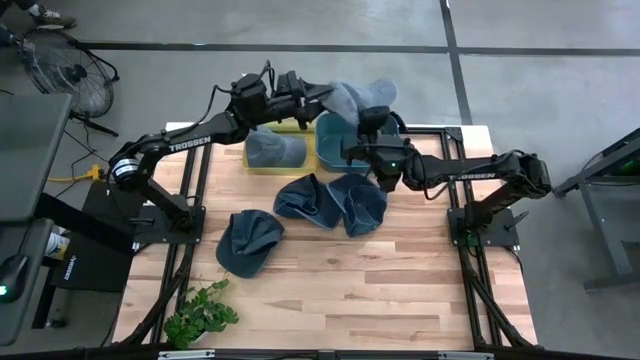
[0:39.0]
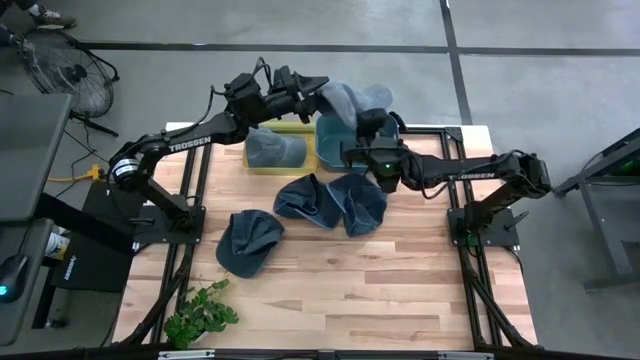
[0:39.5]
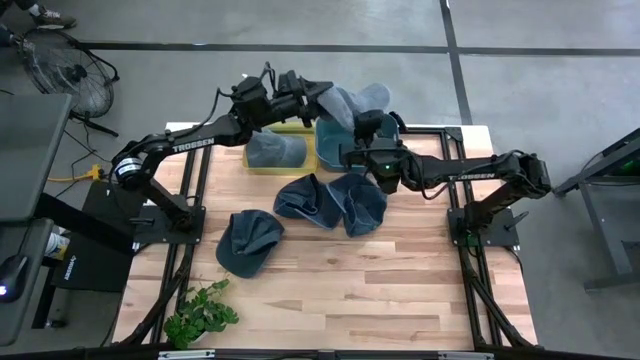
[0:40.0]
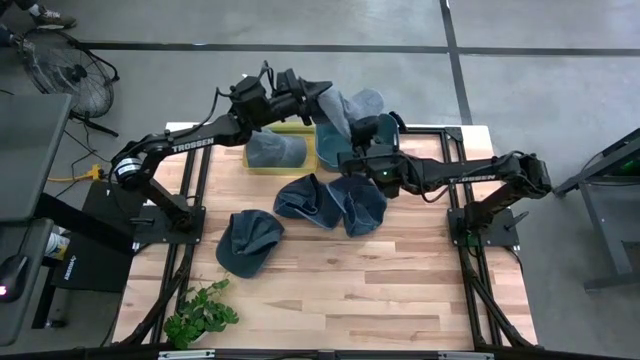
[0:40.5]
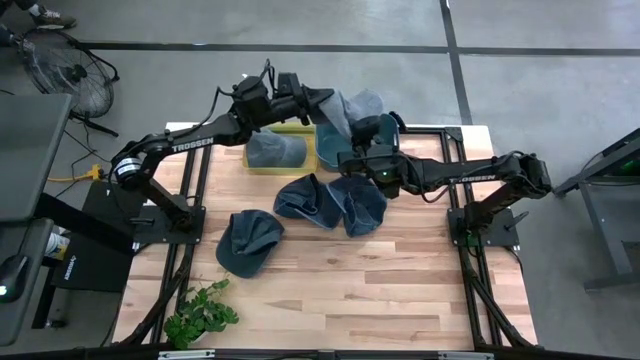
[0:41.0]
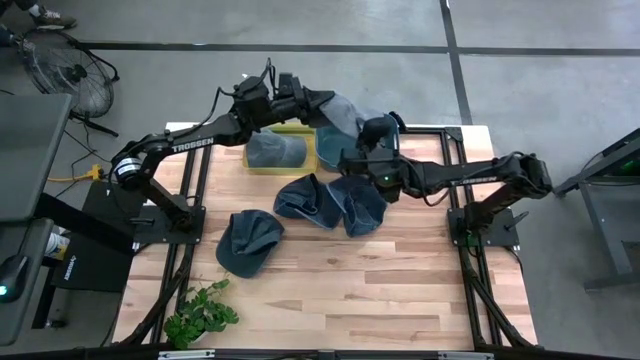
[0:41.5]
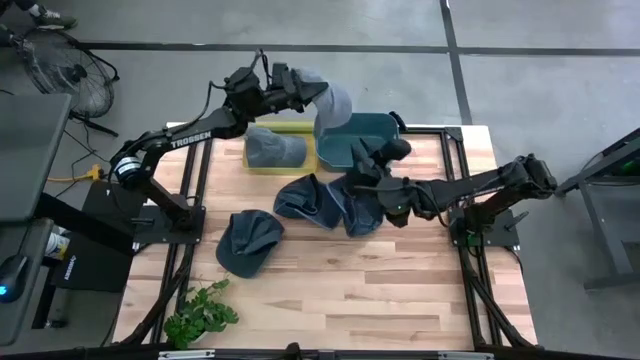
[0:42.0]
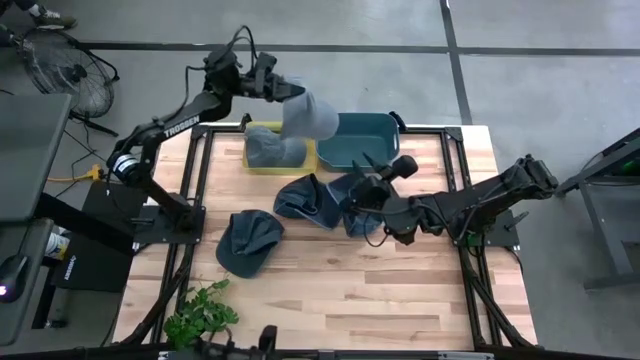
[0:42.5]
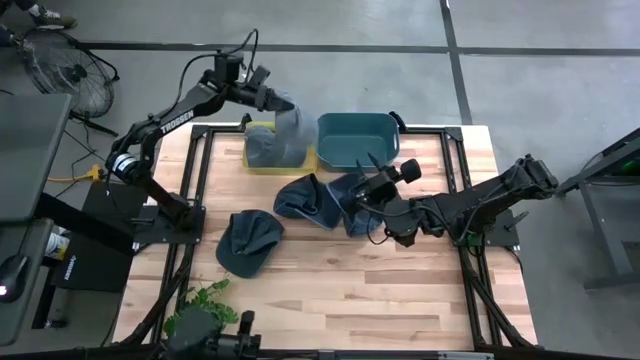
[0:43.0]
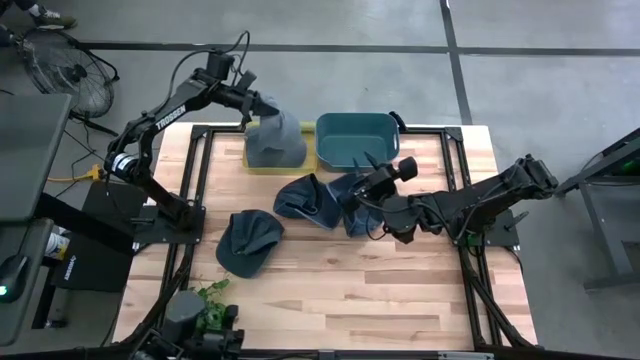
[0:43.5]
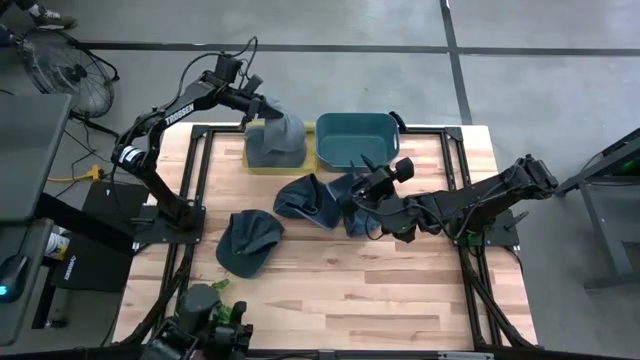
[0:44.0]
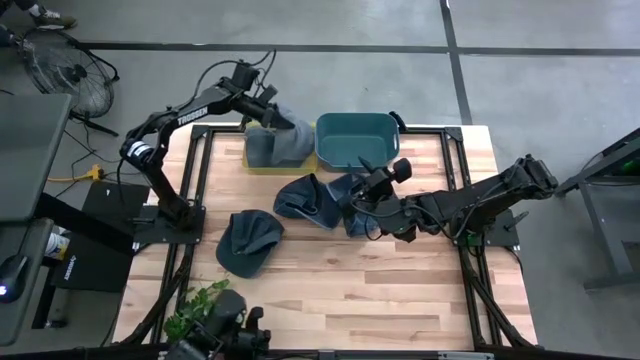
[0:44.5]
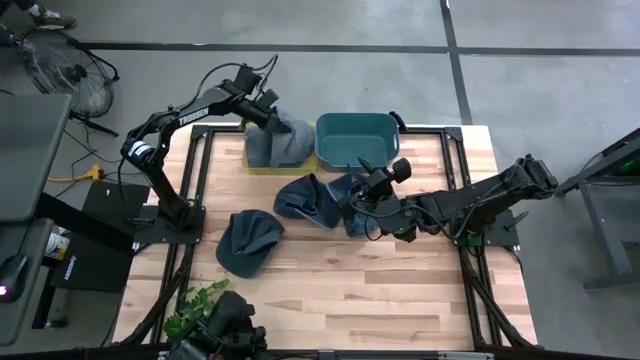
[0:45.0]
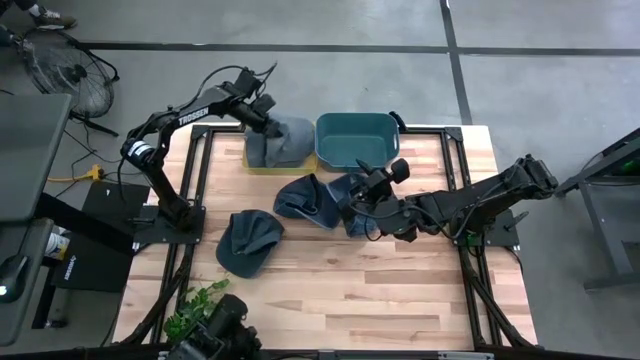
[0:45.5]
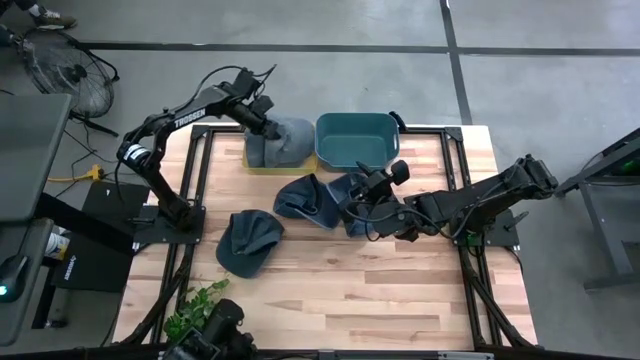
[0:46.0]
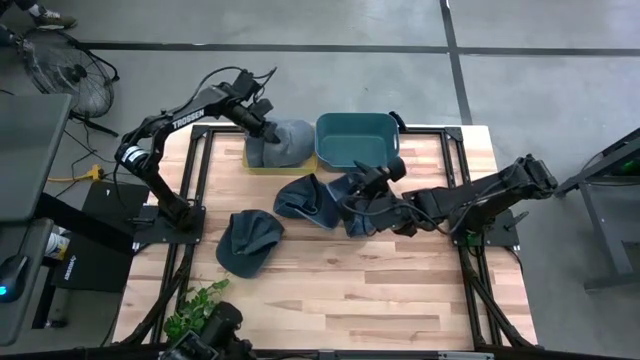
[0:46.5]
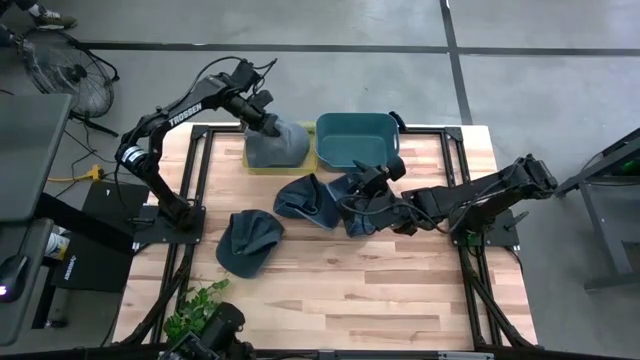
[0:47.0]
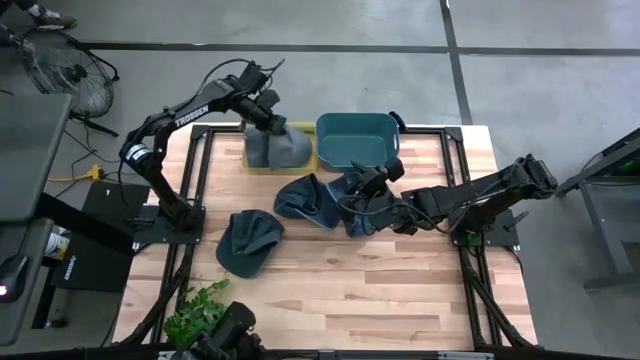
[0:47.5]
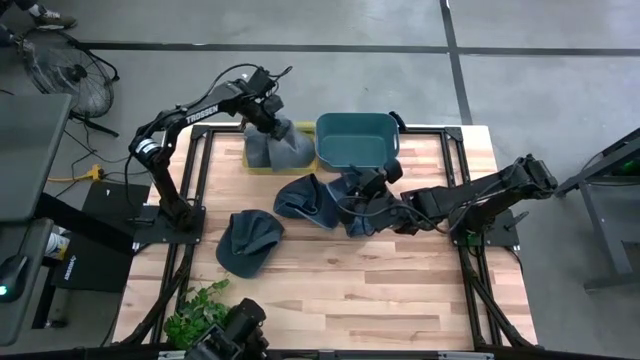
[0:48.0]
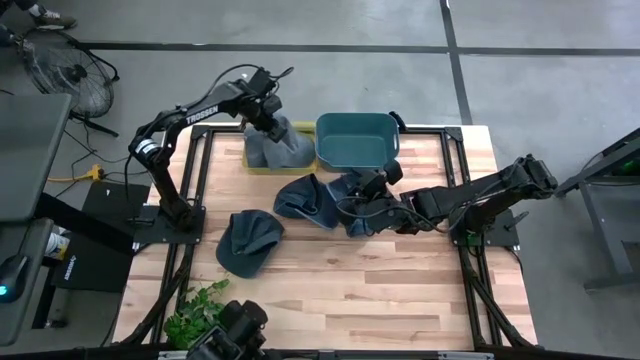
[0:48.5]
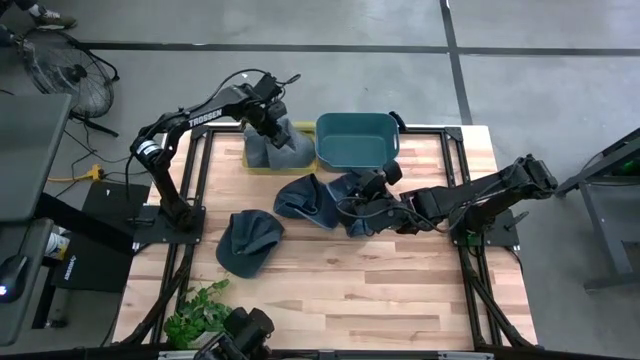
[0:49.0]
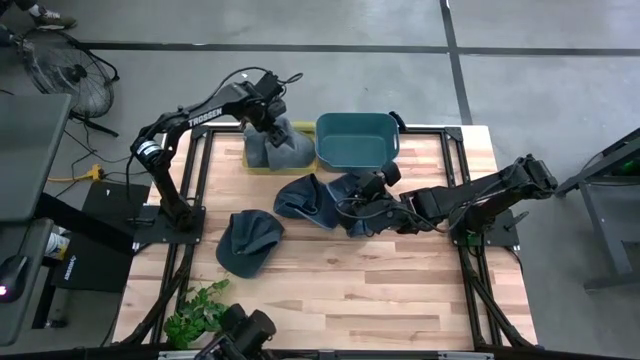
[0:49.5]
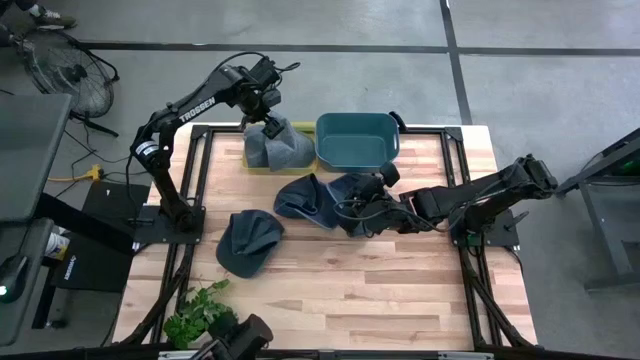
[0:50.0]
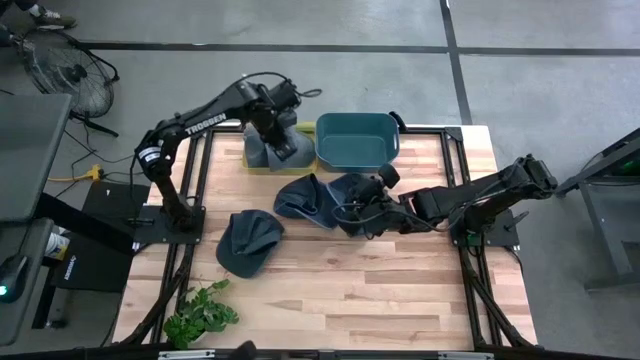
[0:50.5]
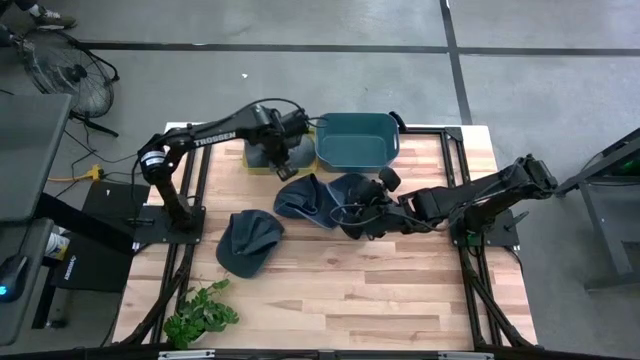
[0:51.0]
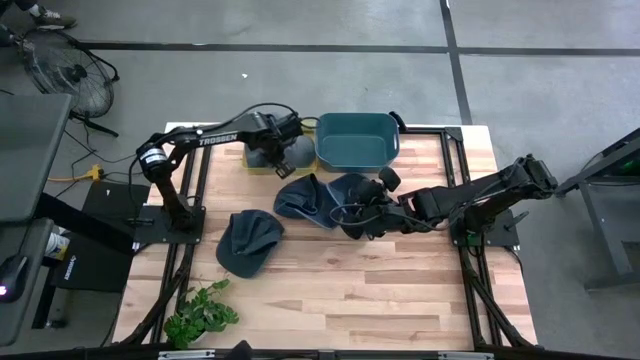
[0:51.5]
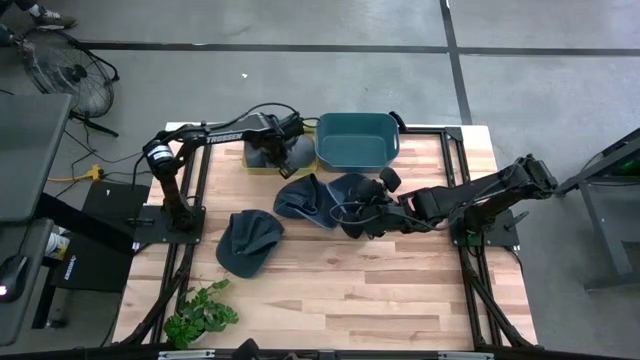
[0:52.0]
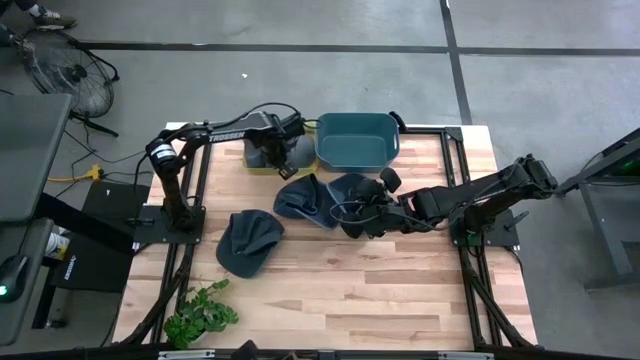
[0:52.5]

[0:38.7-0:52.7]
Task: Pick & Place hat
Put the gray cap into the yellow bin

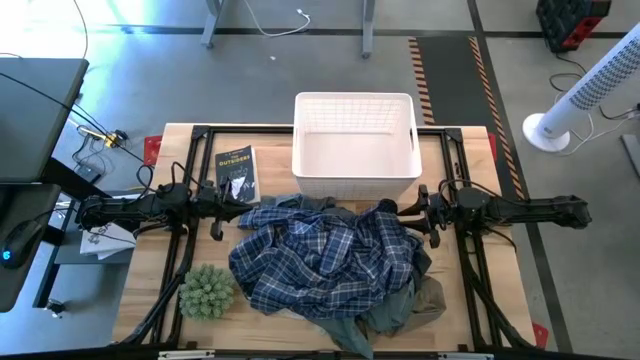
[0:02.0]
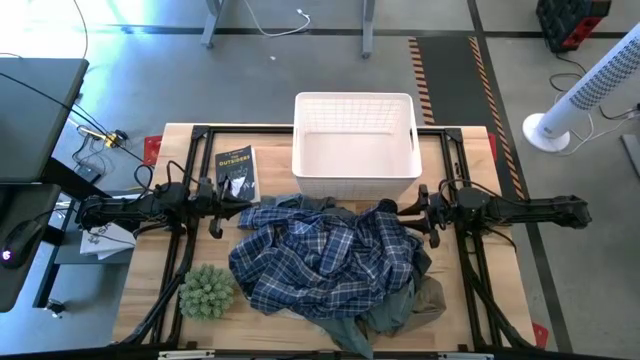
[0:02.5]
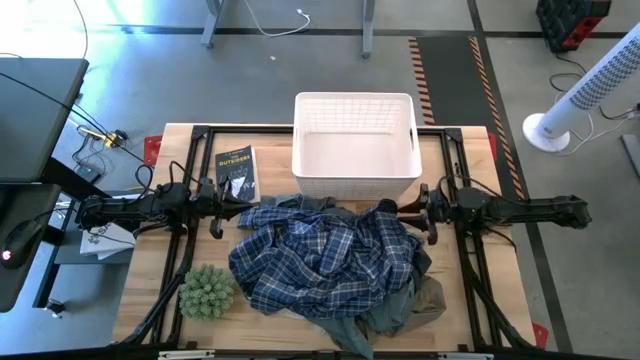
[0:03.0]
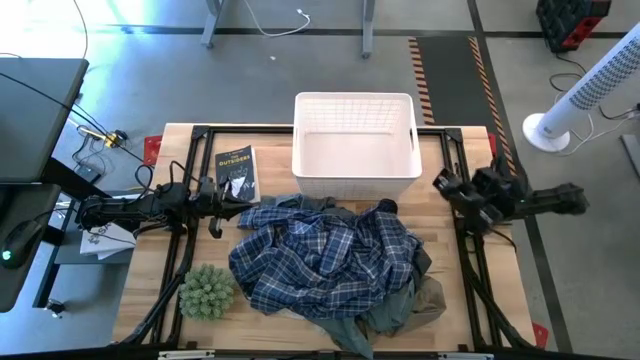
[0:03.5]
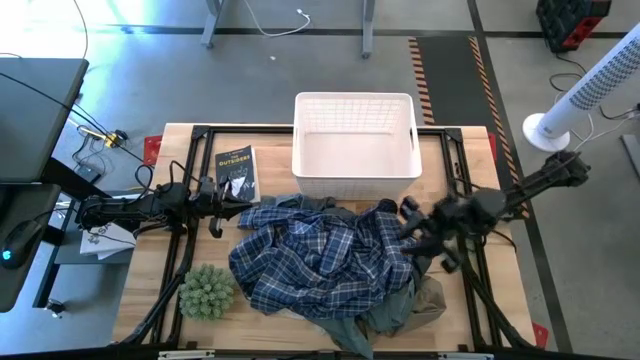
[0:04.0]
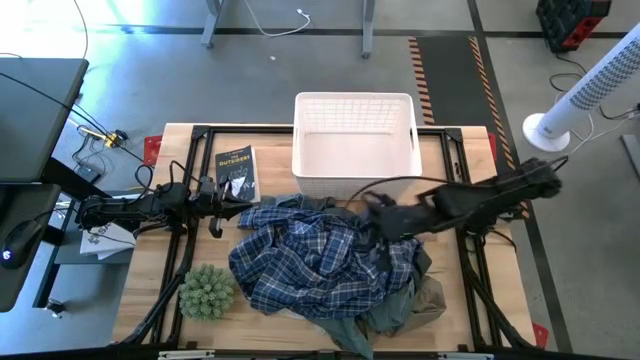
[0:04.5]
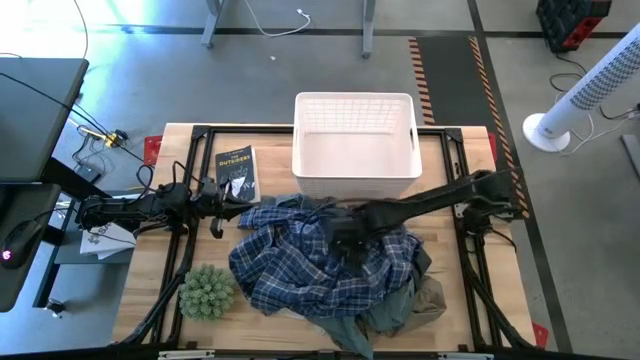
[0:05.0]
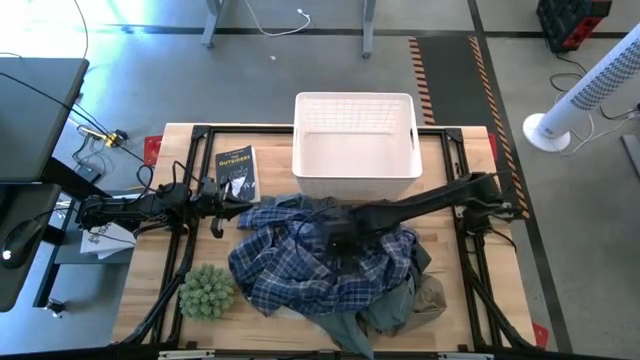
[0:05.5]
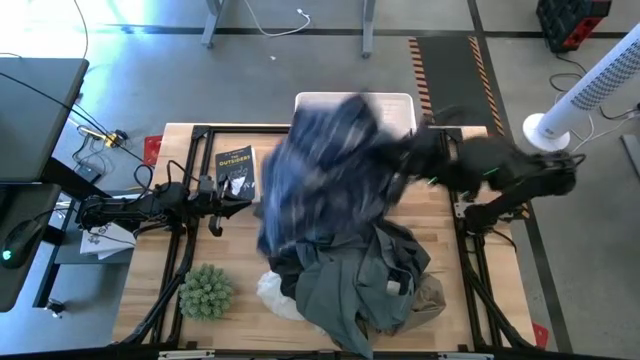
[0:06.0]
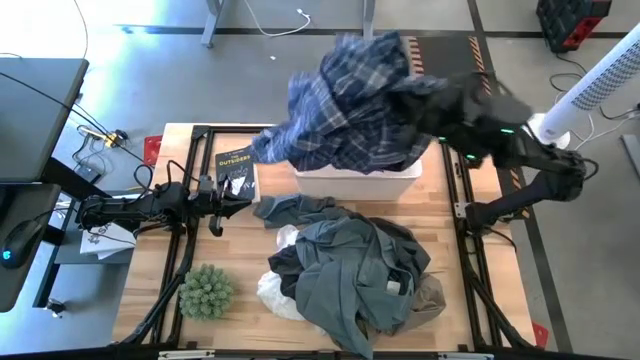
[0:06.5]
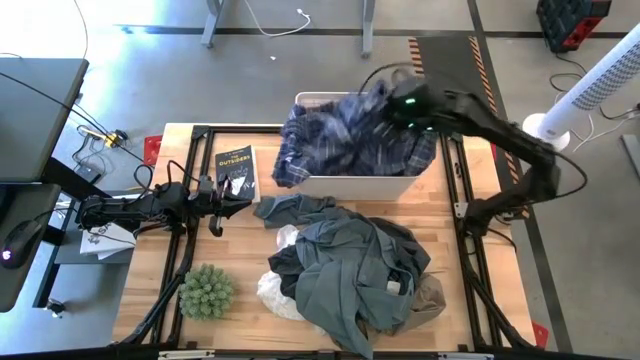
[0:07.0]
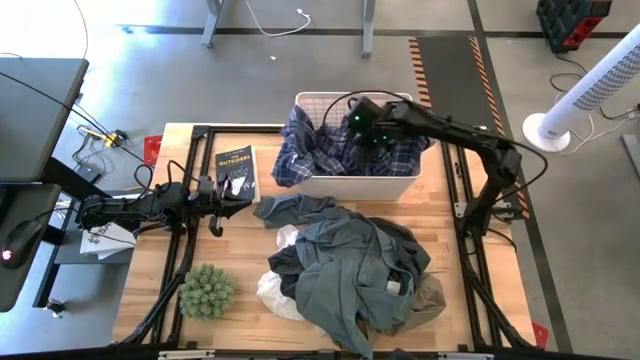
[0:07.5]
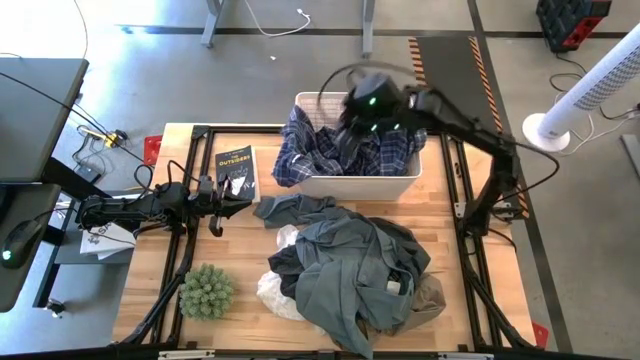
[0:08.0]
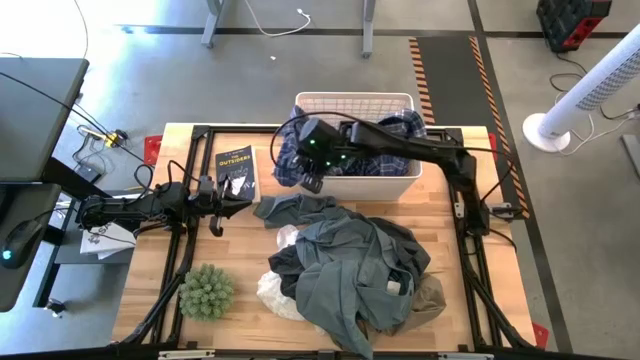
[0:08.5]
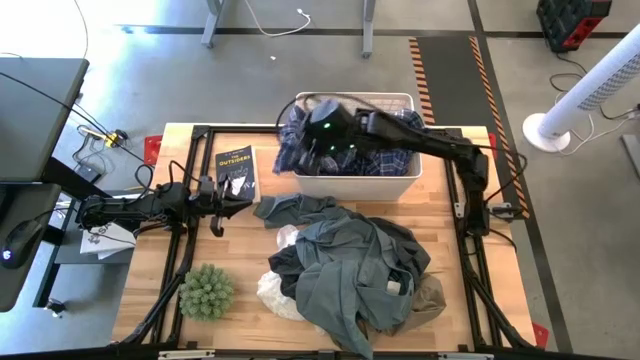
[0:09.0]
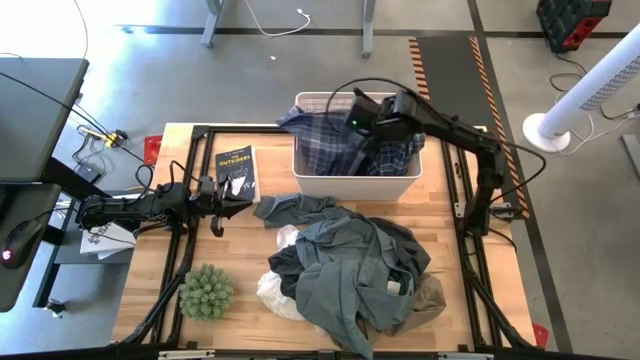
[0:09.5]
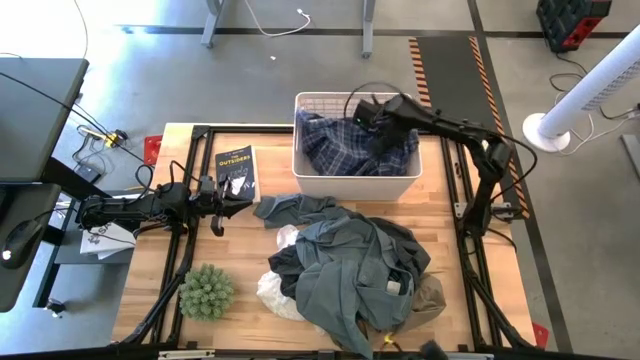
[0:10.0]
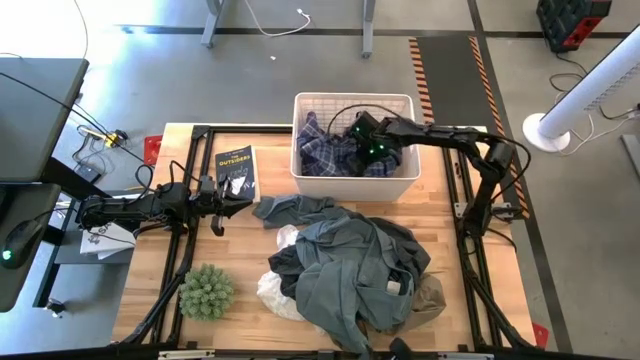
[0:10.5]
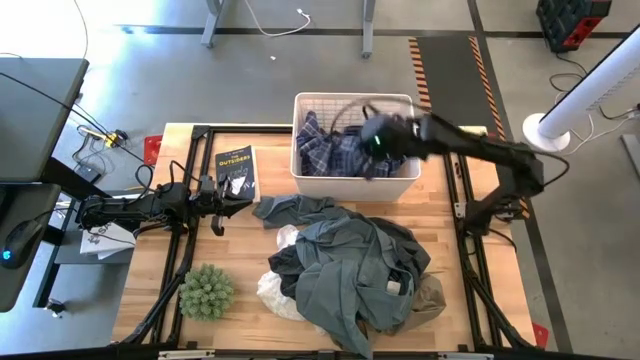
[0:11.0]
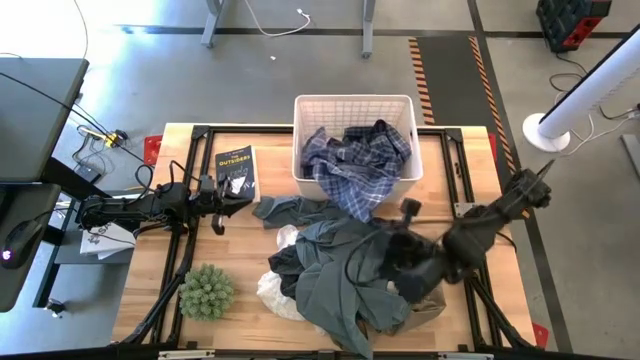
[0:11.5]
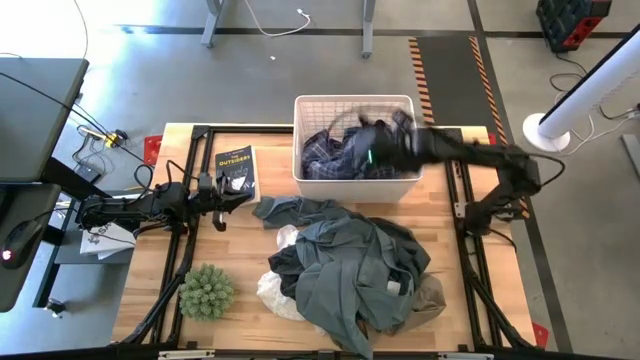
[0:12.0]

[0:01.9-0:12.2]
Task: Sort clothes
Put the blue plaid shirt into the white bin
